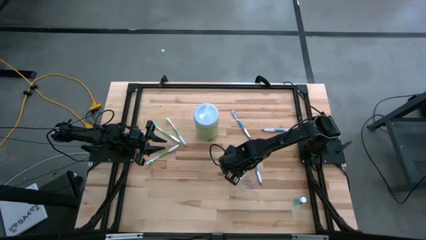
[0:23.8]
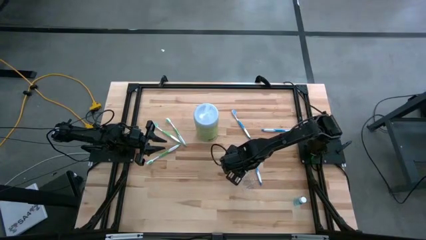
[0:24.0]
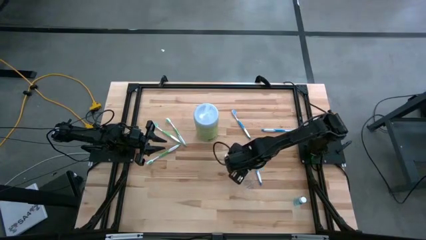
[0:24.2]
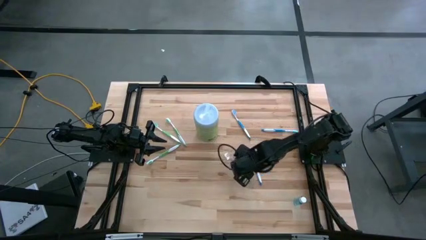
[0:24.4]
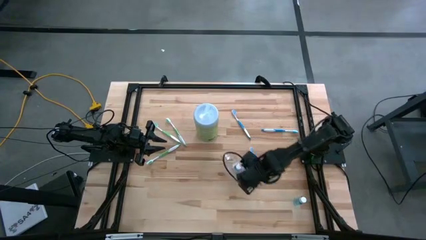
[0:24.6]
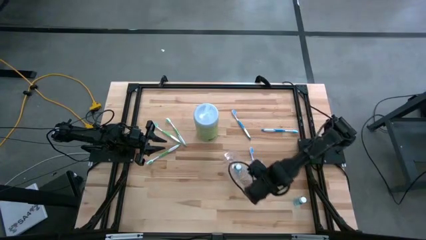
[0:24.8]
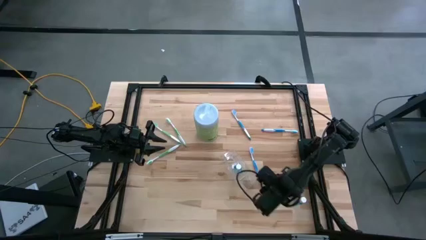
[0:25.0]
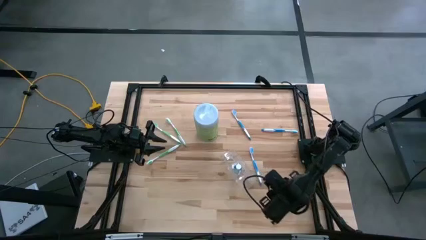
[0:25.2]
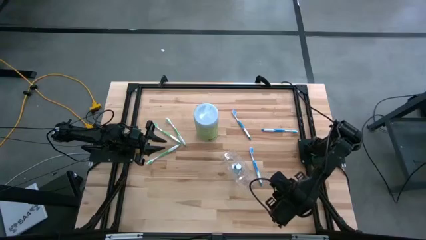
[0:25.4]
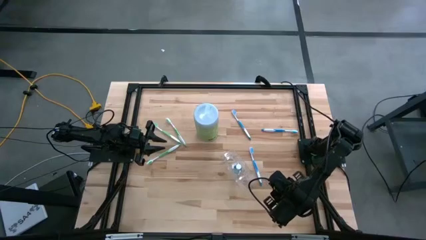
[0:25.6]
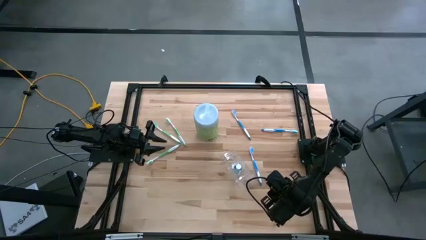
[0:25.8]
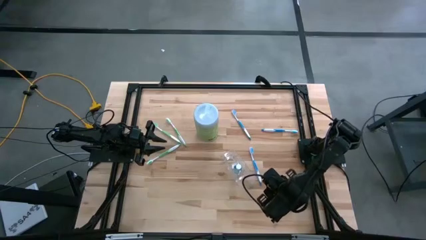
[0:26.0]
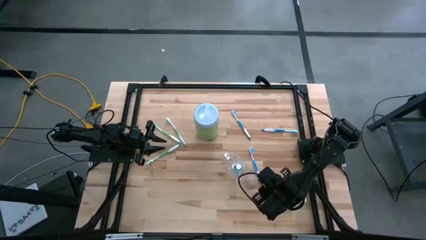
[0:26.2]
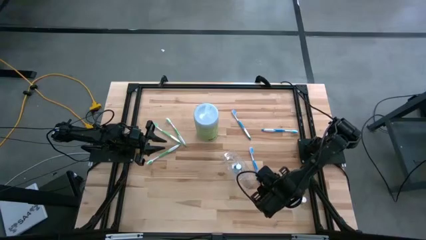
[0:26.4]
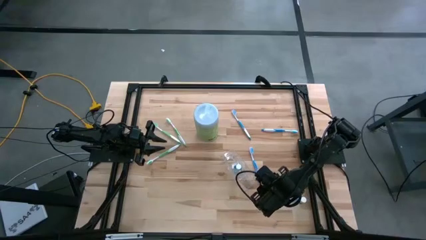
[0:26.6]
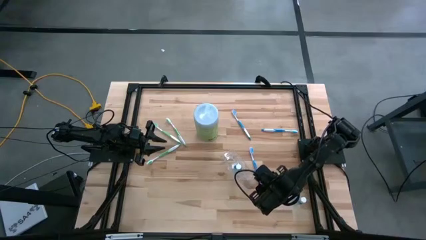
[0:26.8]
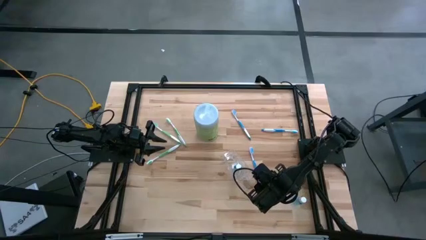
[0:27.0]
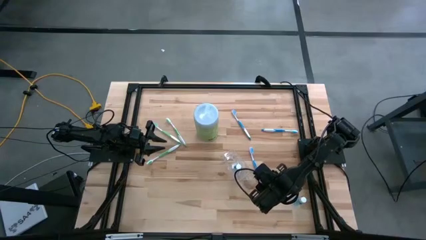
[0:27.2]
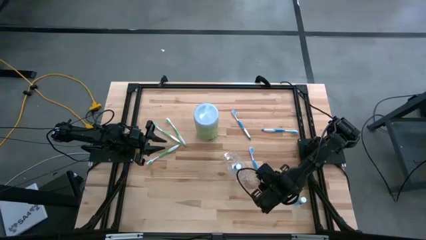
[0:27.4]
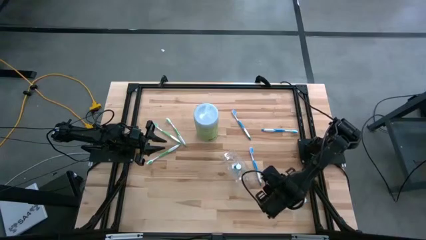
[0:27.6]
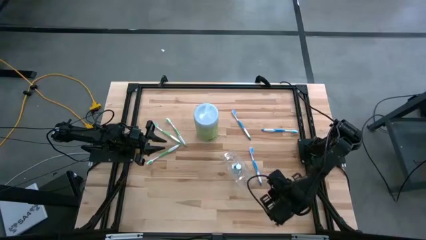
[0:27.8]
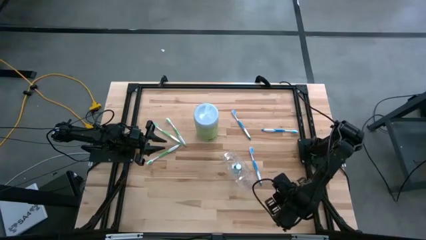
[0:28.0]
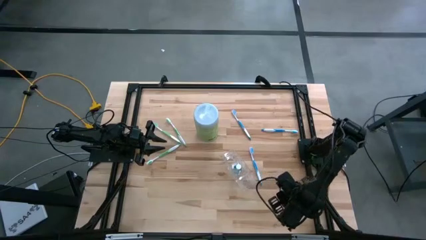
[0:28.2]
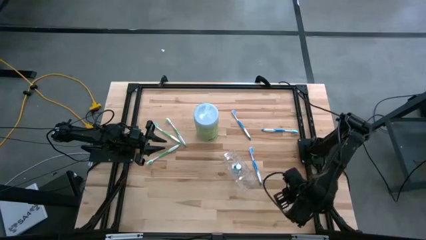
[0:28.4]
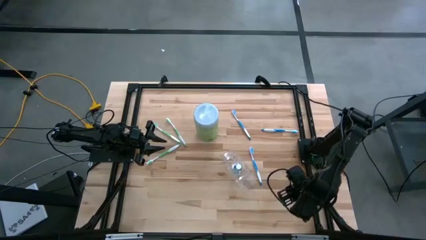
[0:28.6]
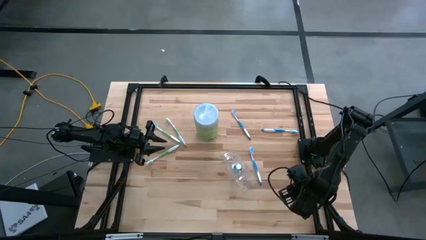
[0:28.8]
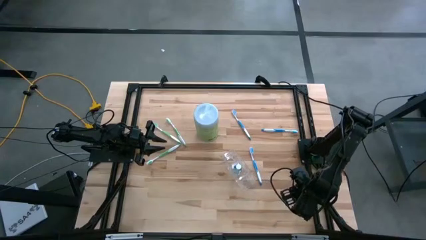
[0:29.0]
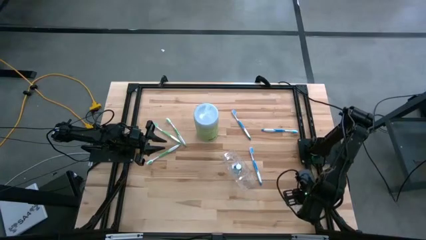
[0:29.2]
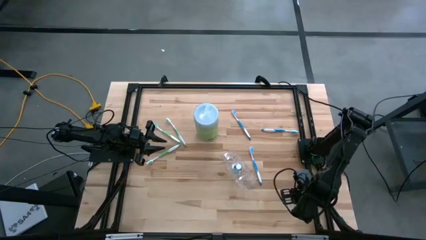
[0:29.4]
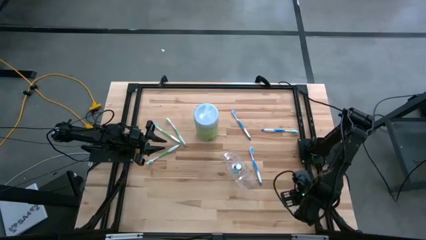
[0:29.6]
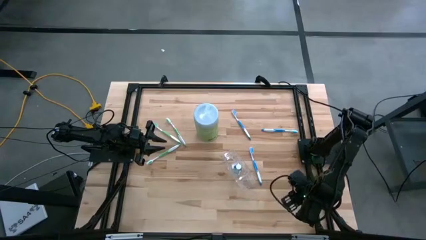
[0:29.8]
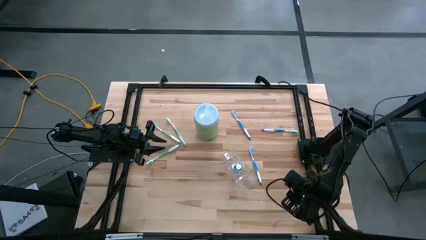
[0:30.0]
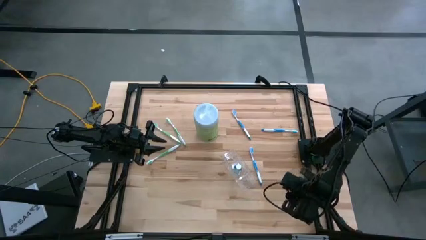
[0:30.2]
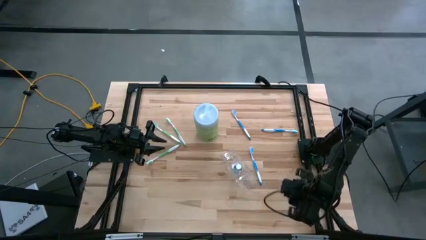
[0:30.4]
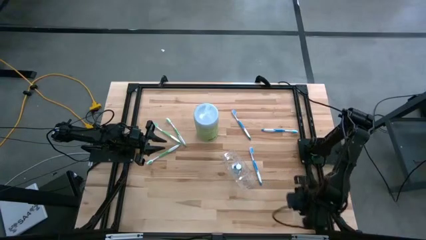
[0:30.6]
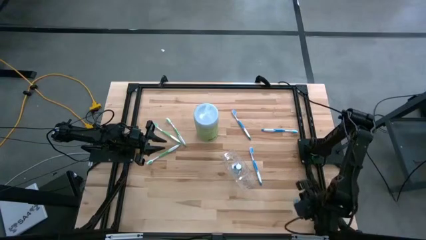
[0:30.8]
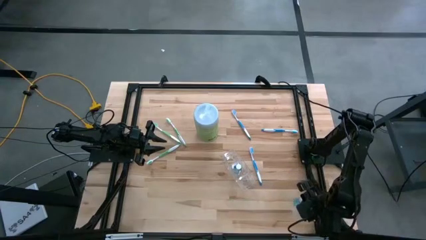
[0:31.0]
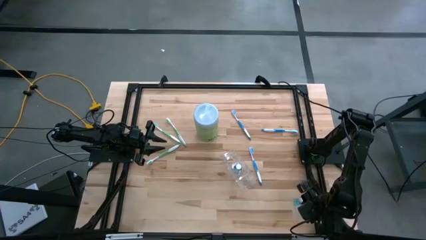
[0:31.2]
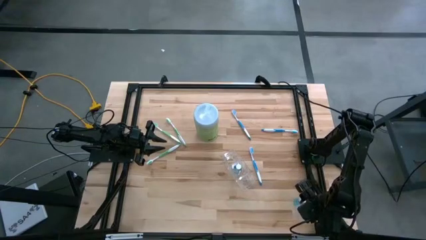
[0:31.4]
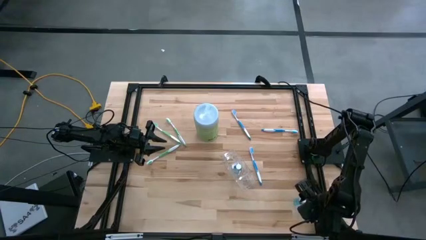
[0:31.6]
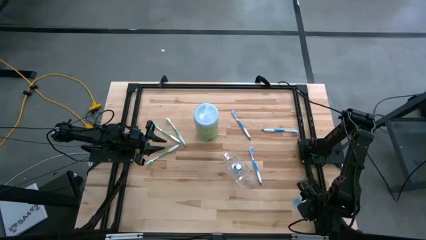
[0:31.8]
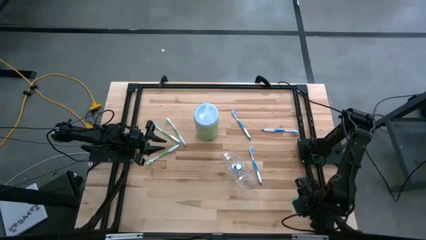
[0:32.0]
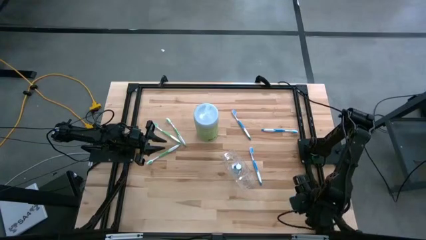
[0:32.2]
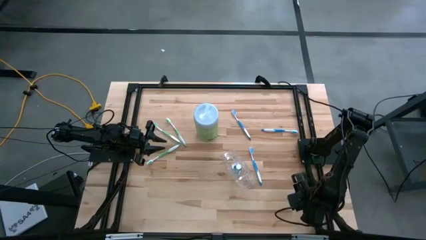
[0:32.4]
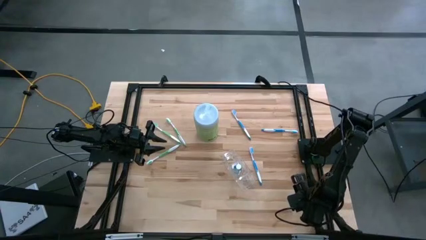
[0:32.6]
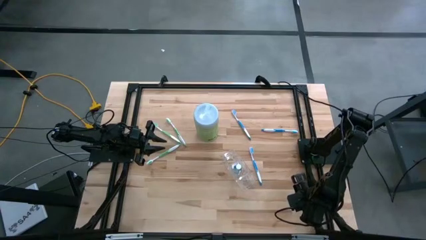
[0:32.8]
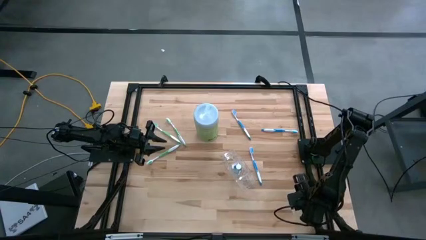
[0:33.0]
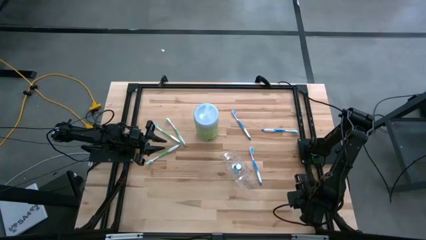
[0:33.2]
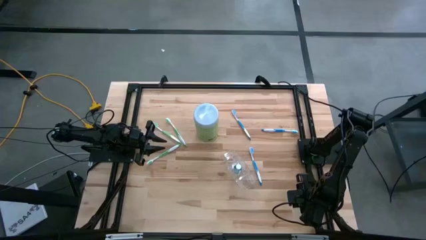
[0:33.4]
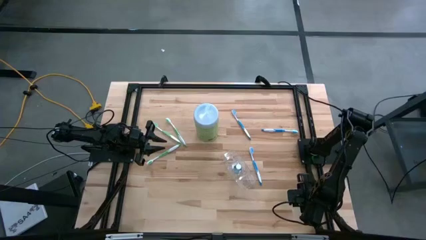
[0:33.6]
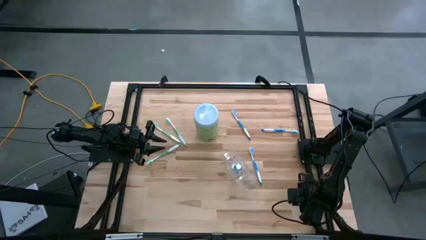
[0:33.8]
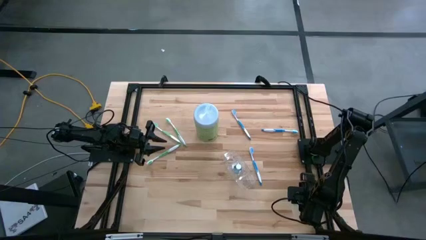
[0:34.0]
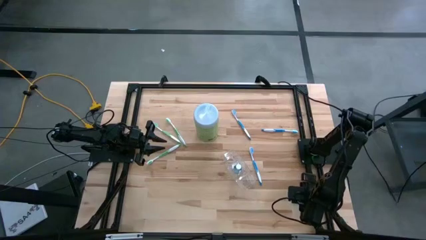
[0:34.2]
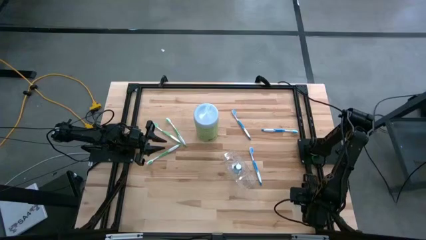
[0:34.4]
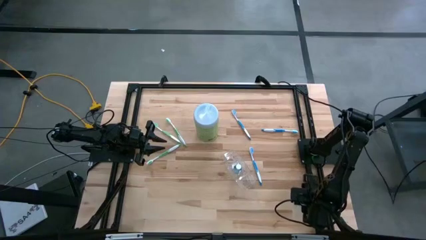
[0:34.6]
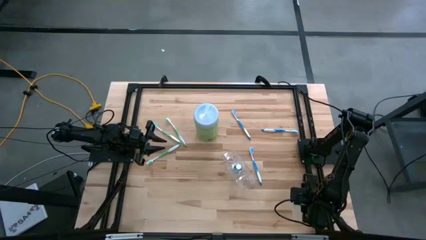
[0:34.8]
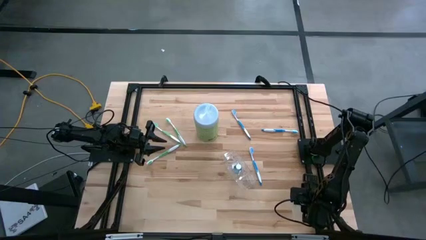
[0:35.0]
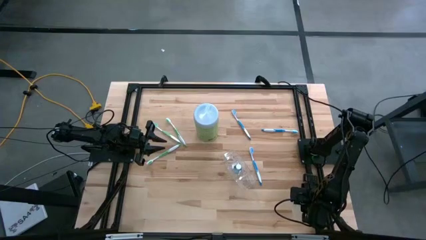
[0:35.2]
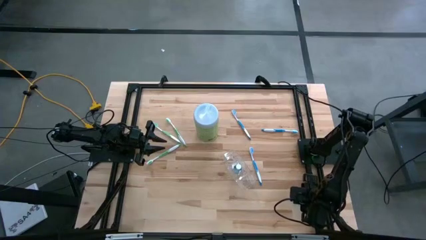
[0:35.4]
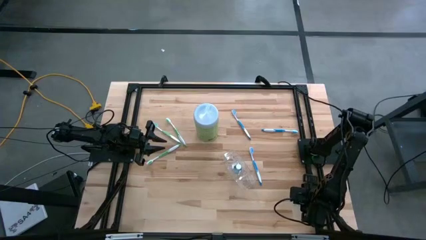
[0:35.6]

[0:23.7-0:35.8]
Task: Pick & Place toothbrushing station
Put the mouthwash into the transparent organizer

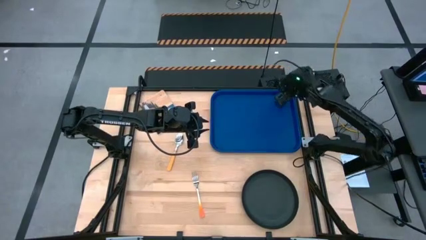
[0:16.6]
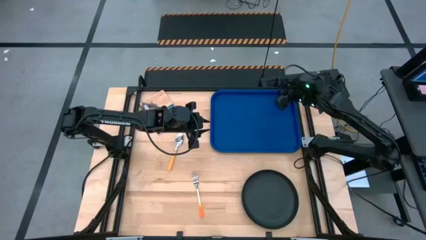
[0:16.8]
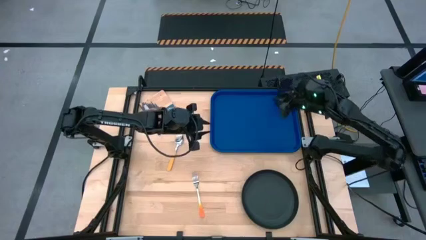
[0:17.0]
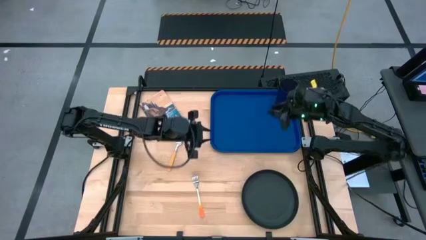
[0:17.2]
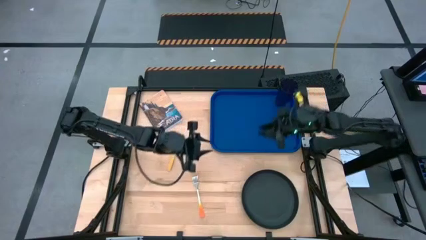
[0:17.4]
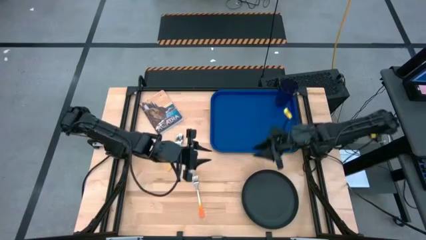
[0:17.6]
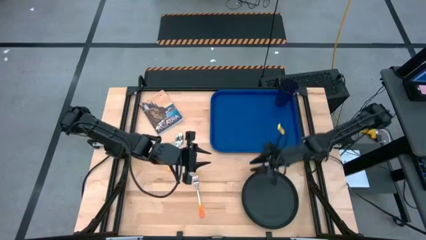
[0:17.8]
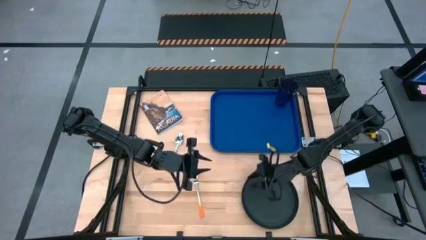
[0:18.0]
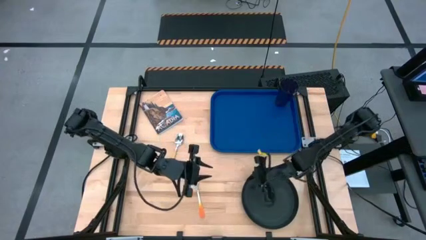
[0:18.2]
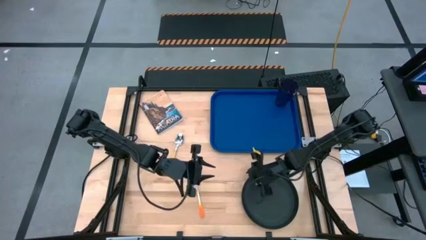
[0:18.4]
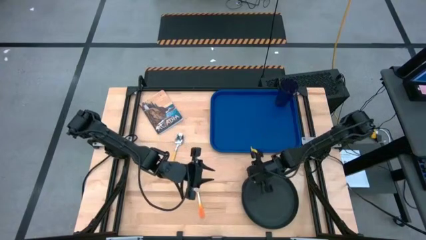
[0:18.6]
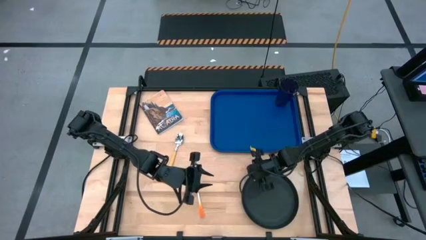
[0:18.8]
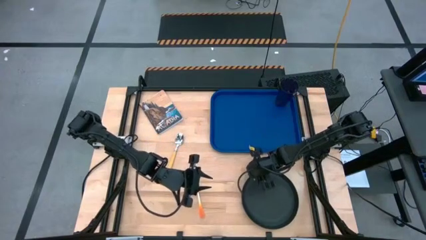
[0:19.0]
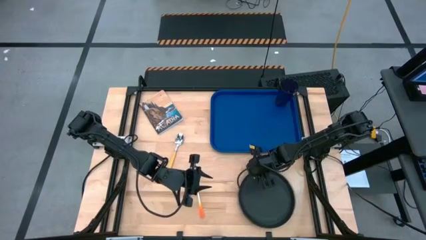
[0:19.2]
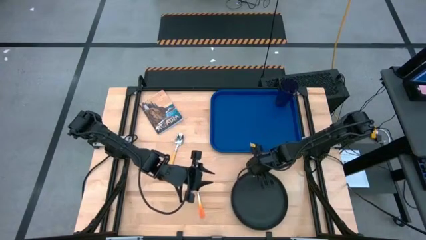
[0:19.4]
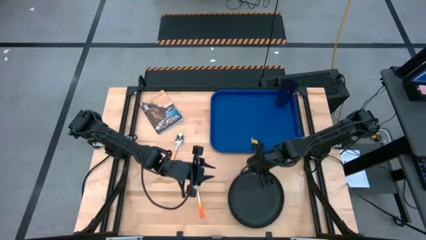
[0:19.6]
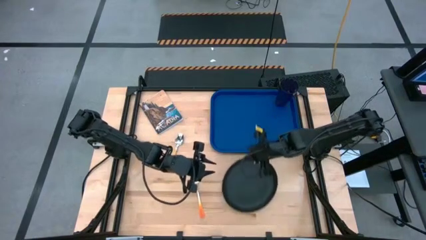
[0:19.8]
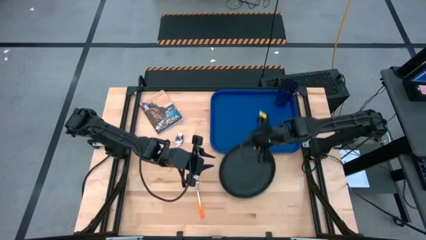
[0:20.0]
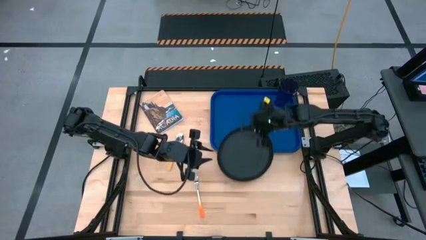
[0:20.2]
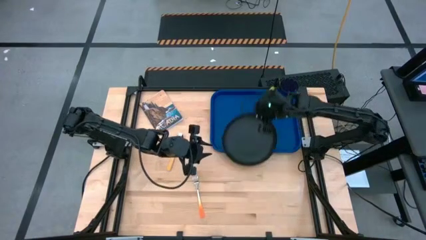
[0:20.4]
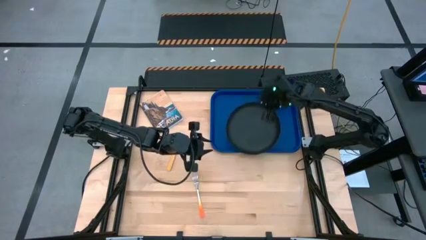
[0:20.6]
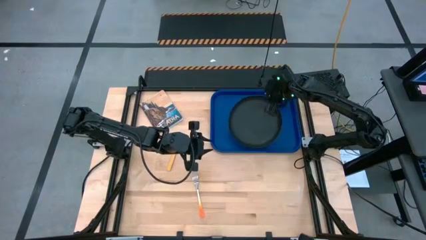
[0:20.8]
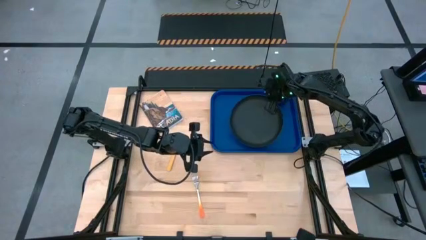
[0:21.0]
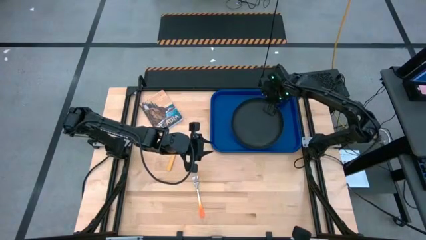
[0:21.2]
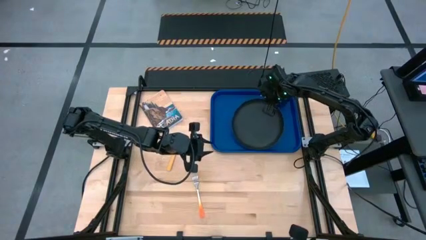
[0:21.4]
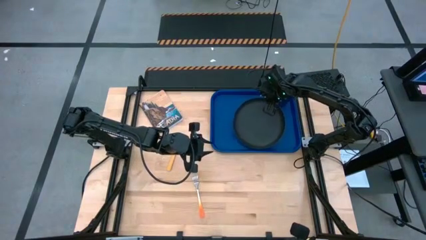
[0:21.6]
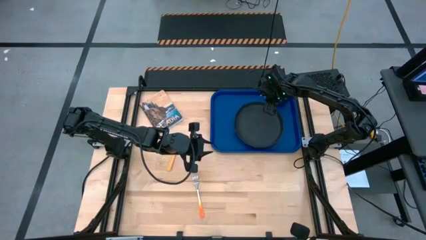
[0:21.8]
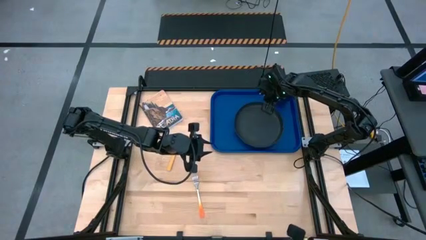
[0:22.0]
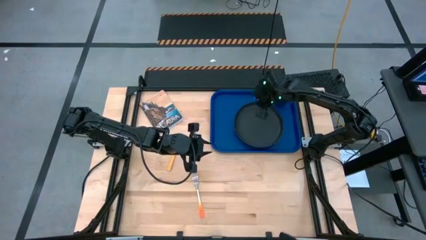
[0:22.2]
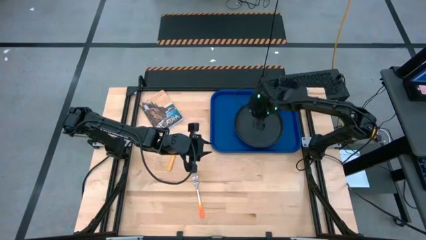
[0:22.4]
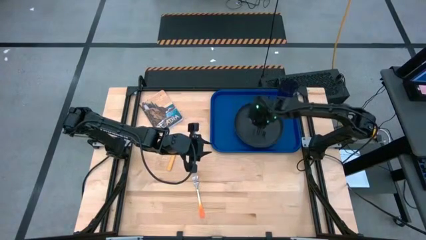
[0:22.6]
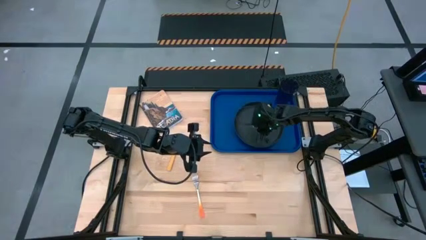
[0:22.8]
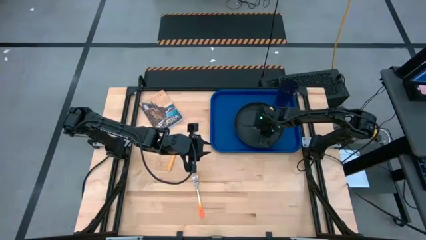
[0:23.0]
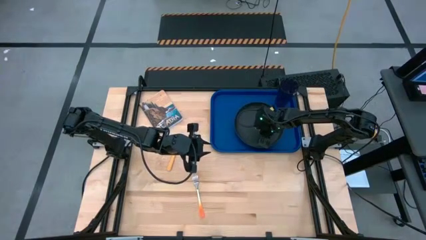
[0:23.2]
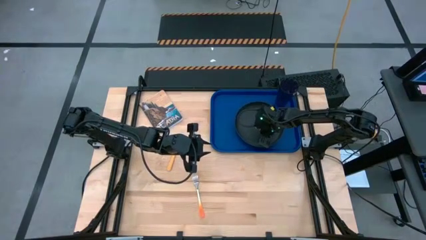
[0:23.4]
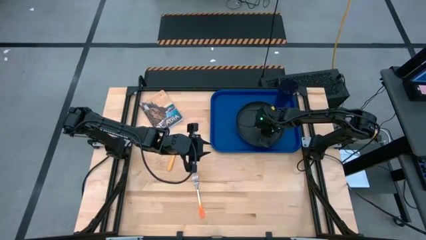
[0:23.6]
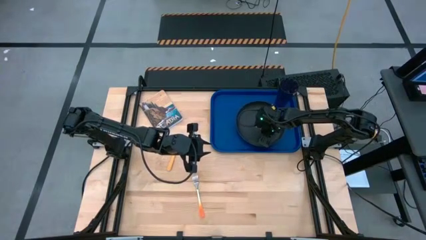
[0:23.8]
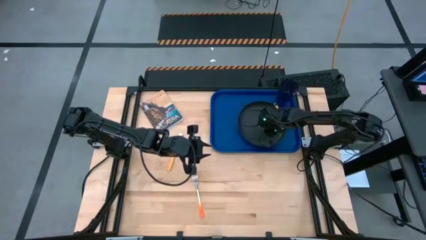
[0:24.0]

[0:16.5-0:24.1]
Task: Pick and place plate/cup/fork/spoon on tray
Put the black plate on the blue tray to the bottom left of the violet cup
